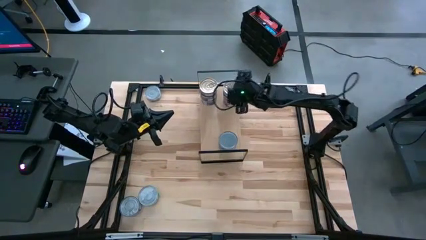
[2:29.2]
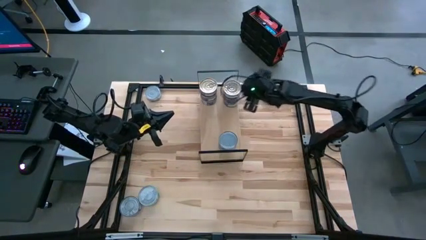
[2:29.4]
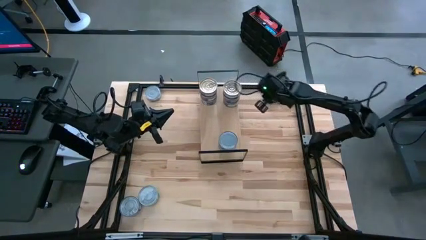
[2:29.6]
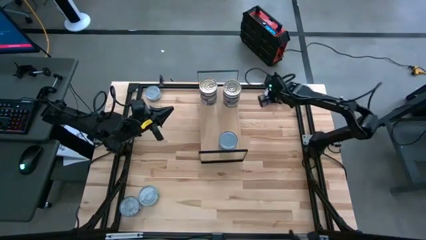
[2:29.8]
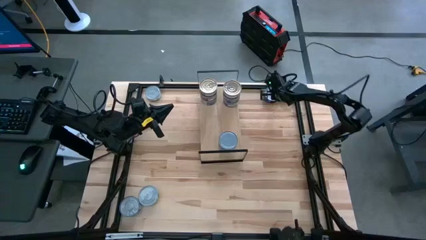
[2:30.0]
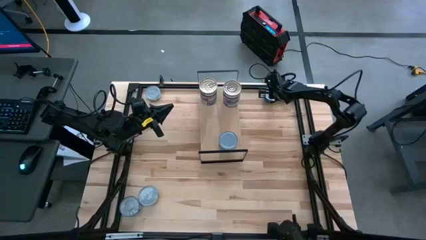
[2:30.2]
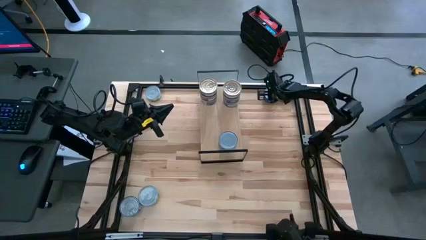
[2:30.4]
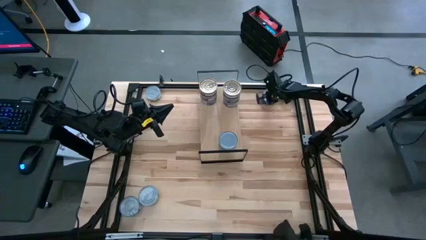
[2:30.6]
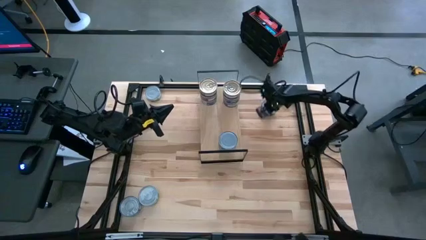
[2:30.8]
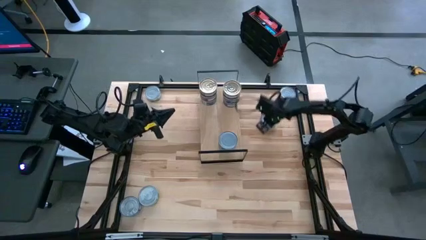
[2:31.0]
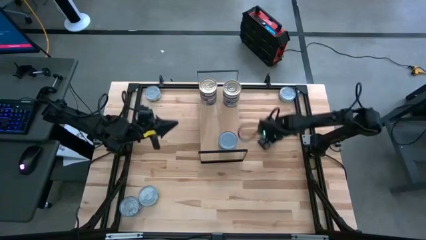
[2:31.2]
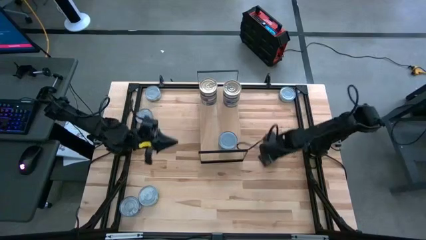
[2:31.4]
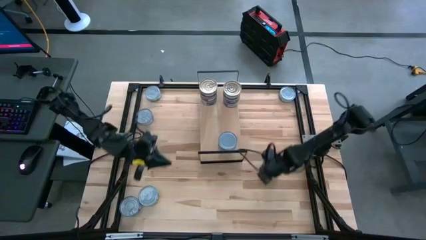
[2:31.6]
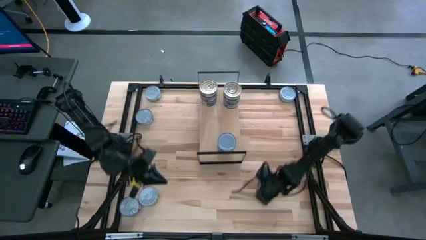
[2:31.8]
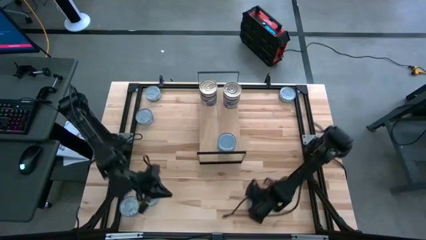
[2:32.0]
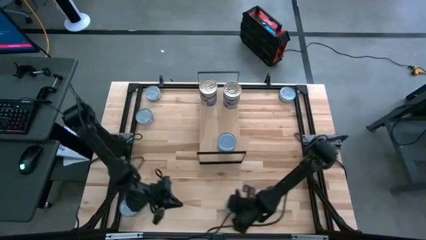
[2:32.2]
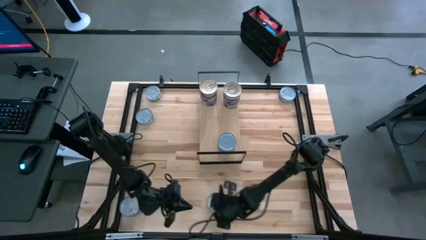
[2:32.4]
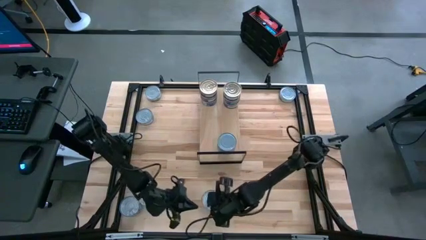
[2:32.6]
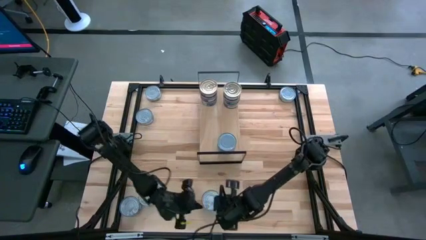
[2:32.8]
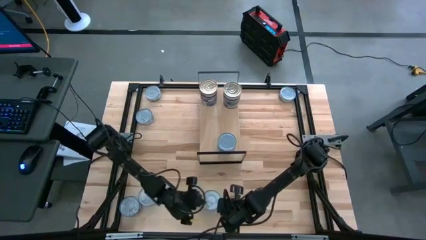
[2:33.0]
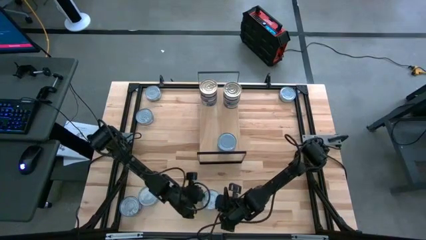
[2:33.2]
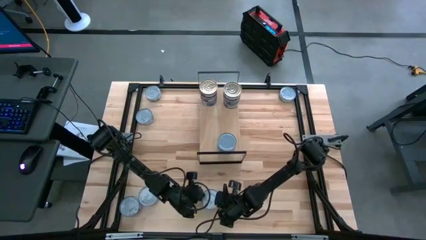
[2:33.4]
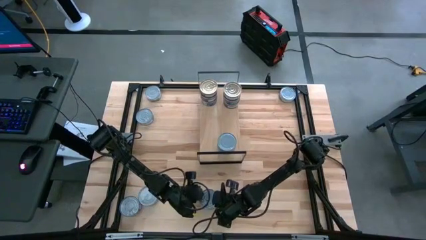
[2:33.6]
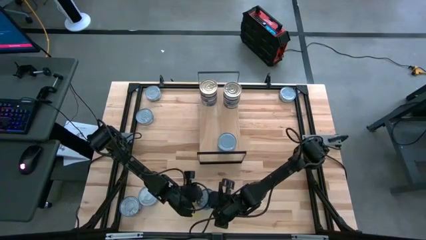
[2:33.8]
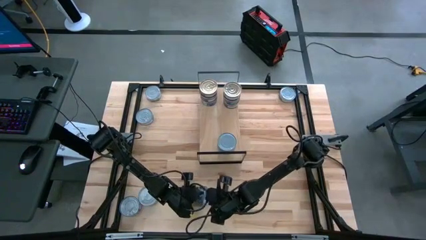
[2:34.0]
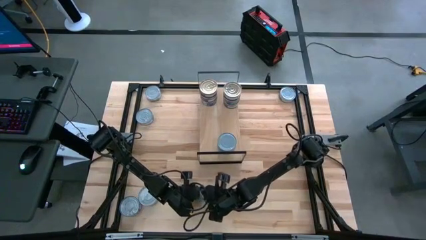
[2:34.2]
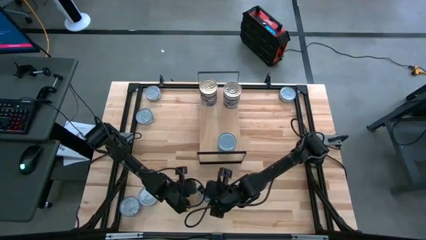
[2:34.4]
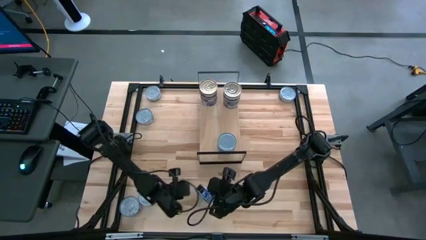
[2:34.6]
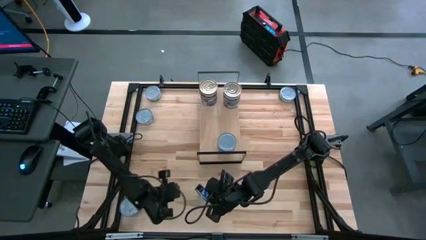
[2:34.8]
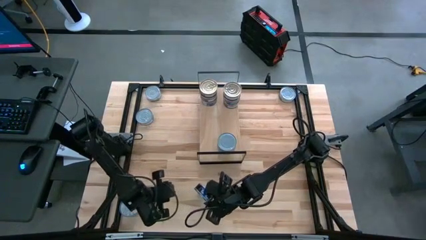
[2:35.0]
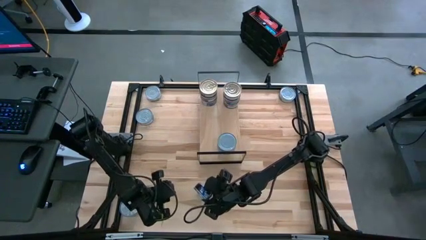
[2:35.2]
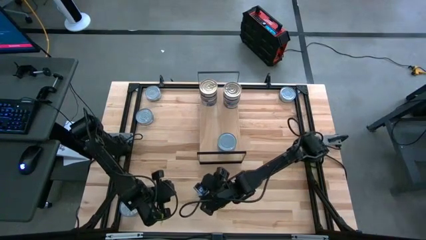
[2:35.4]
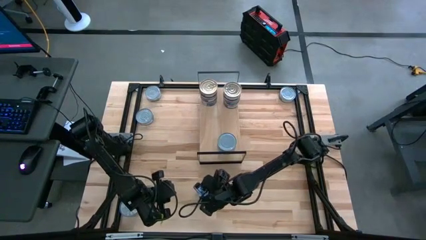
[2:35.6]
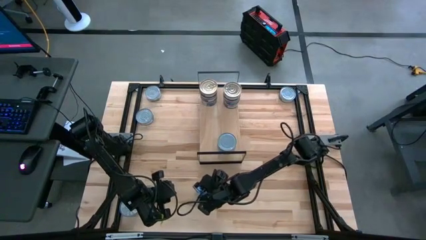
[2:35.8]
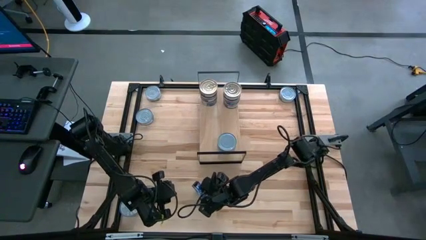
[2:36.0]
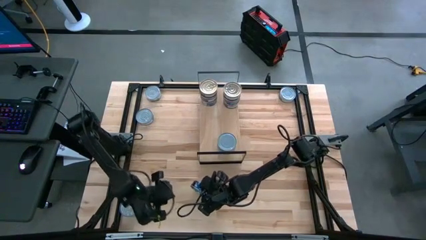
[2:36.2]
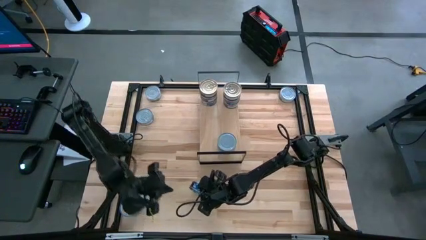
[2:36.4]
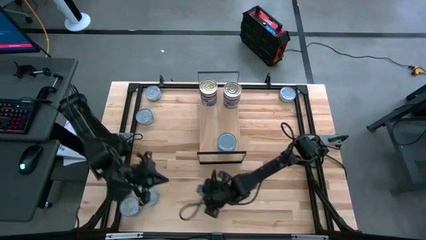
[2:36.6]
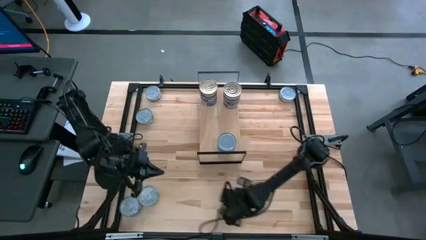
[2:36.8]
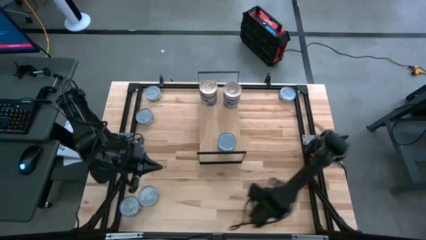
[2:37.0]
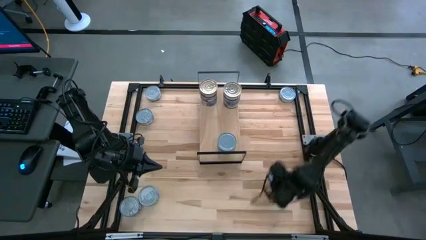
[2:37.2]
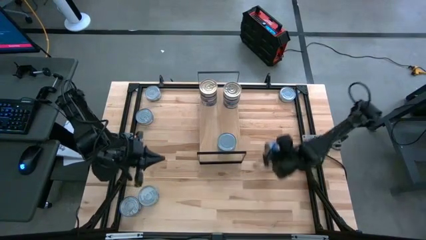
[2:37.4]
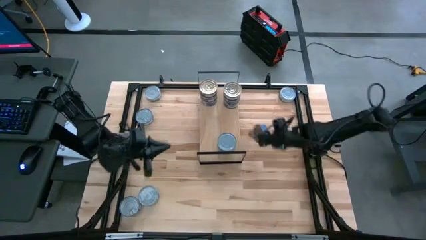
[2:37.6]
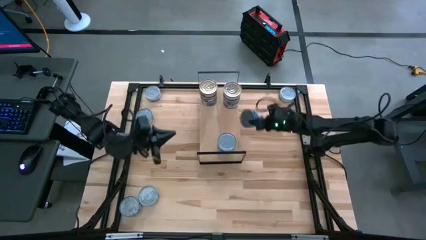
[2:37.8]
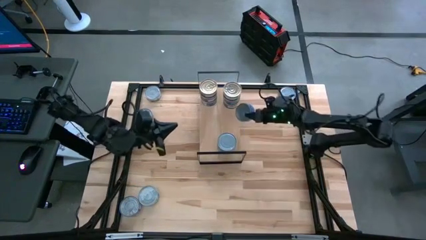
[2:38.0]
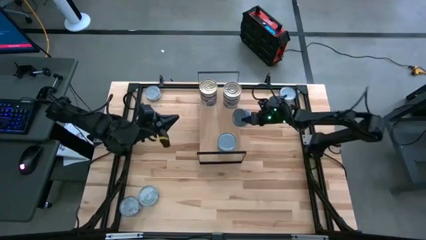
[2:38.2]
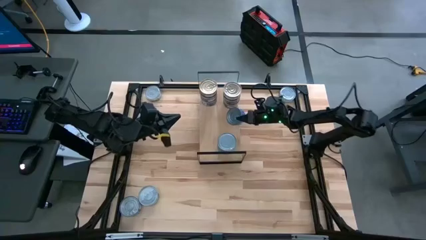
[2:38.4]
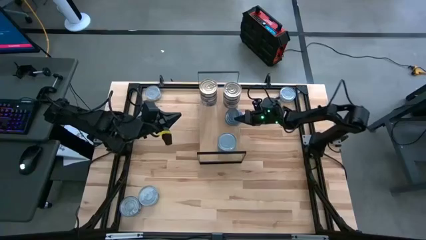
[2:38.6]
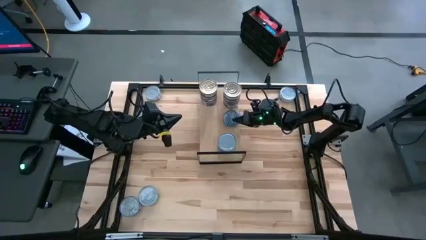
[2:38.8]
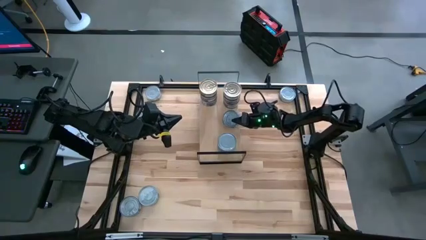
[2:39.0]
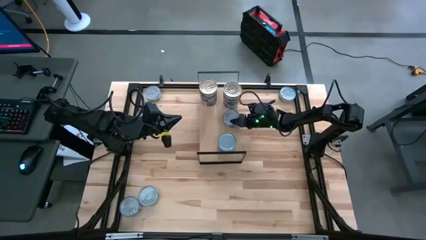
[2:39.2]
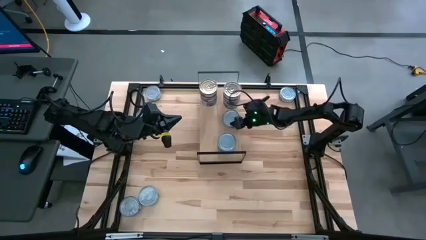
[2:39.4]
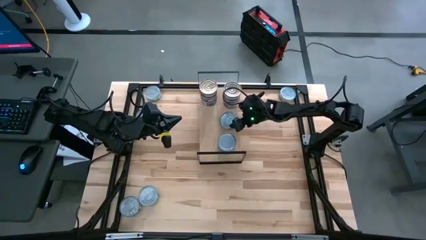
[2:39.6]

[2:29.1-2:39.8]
Task: Stack canned seafood by type on shelf
Put the blue tuna can on the shelf

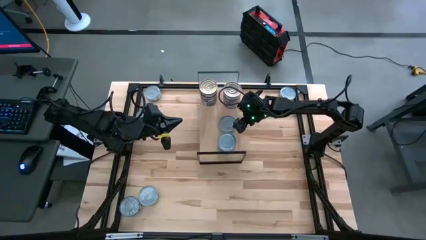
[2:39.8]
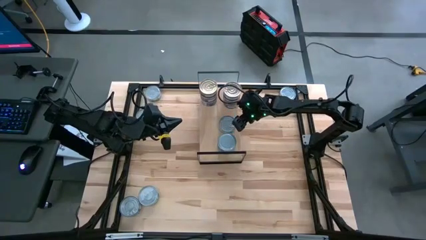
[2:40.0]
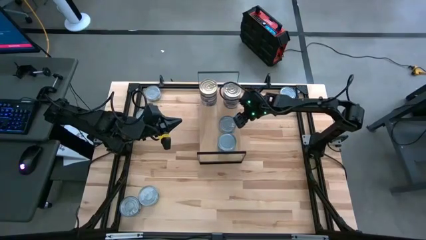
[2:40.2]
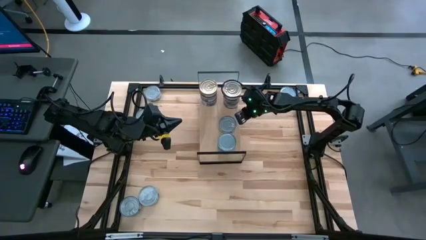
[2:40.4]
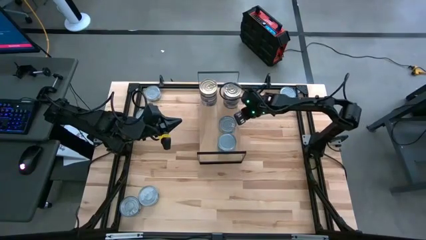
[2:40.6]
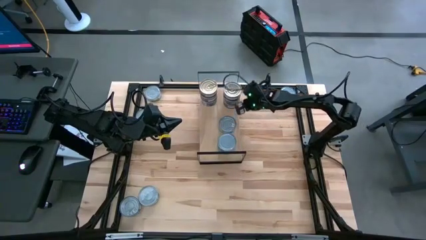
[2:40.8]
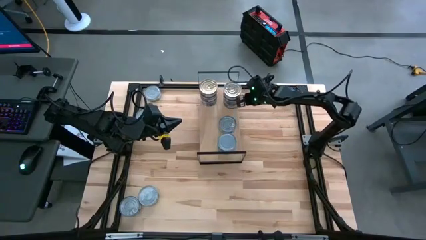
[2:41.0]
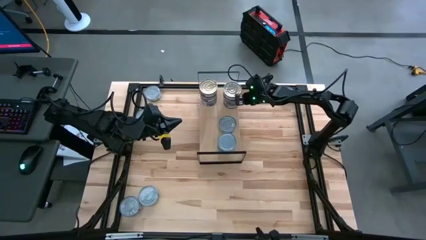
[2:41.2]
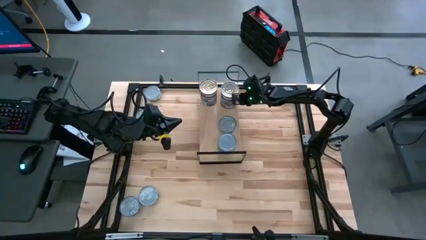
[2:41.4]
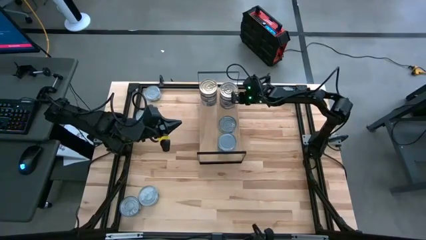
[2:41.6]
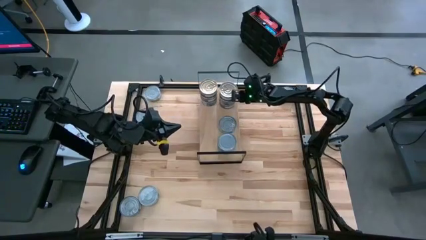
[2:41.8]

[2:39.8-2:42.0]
Adjust the blue pink tuna cans on the shelf
